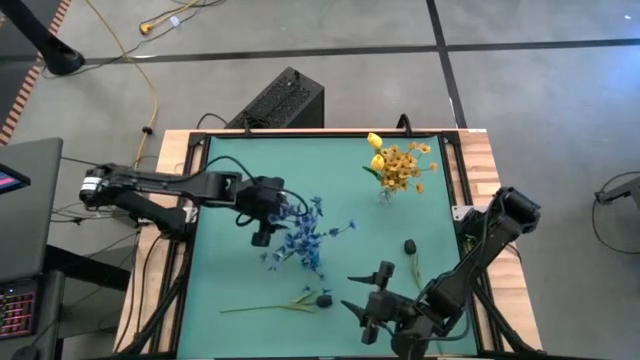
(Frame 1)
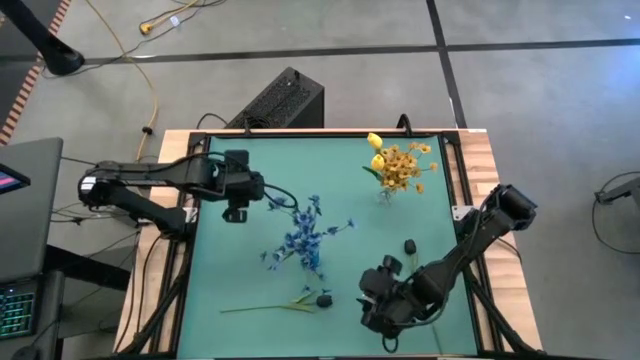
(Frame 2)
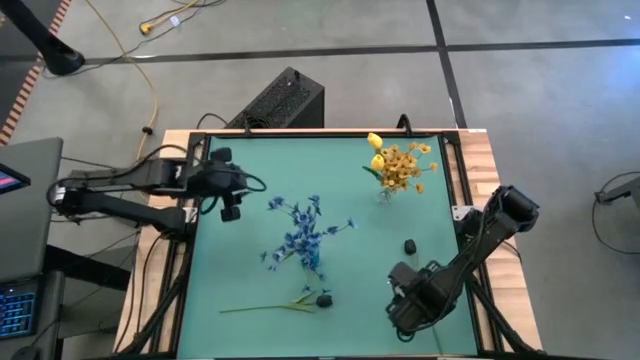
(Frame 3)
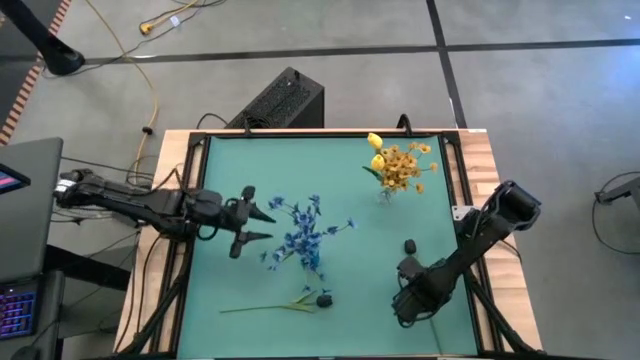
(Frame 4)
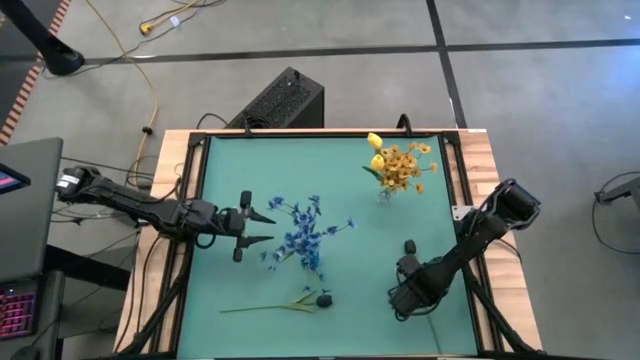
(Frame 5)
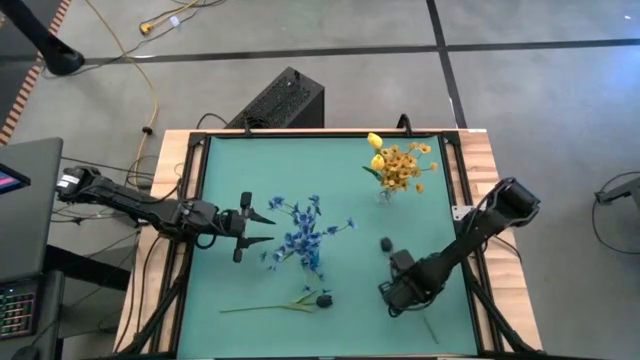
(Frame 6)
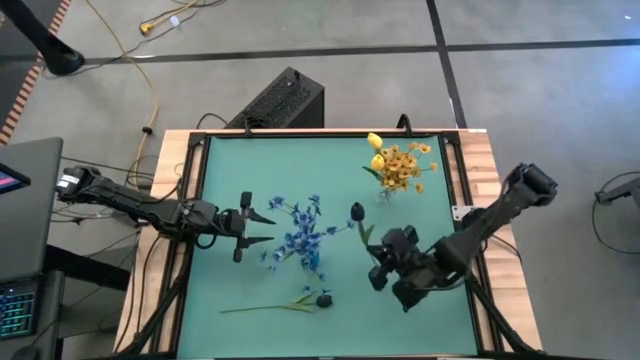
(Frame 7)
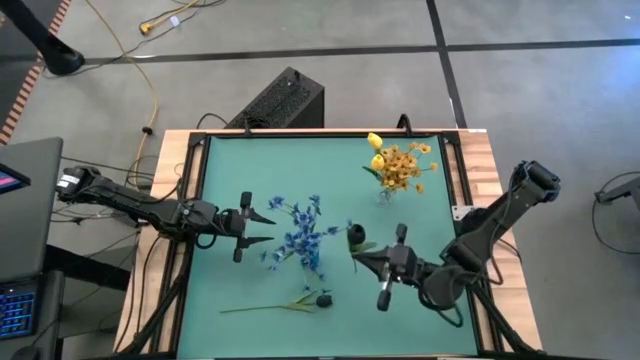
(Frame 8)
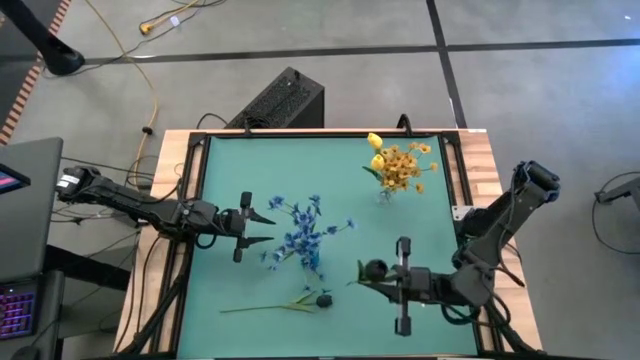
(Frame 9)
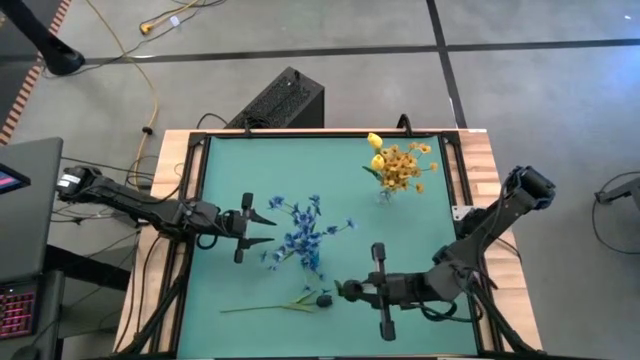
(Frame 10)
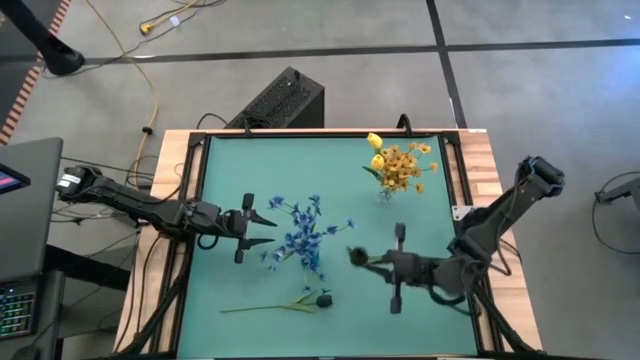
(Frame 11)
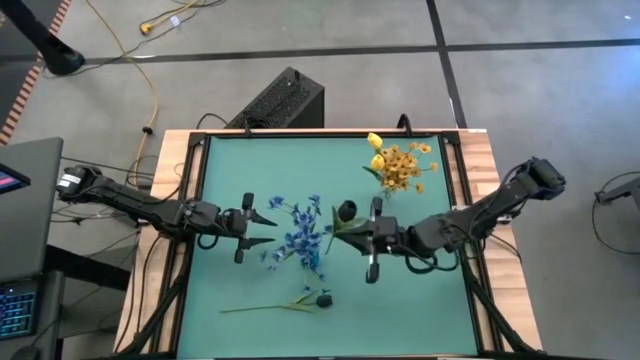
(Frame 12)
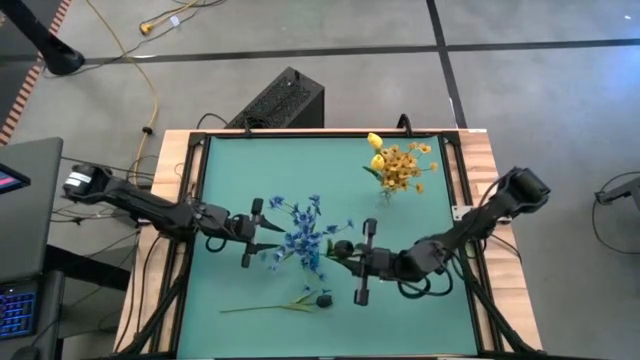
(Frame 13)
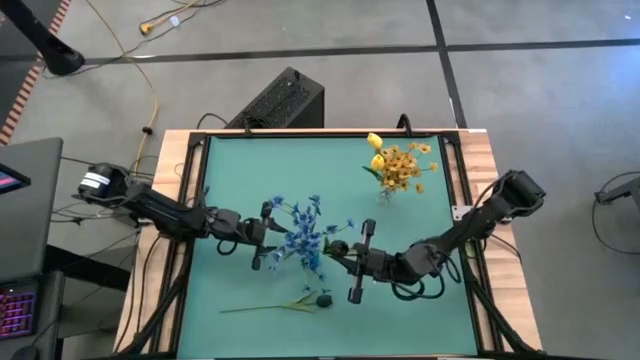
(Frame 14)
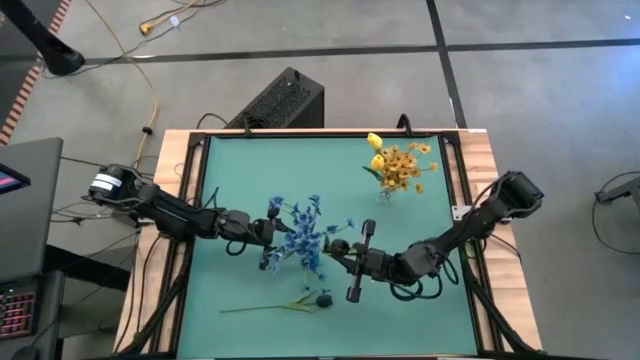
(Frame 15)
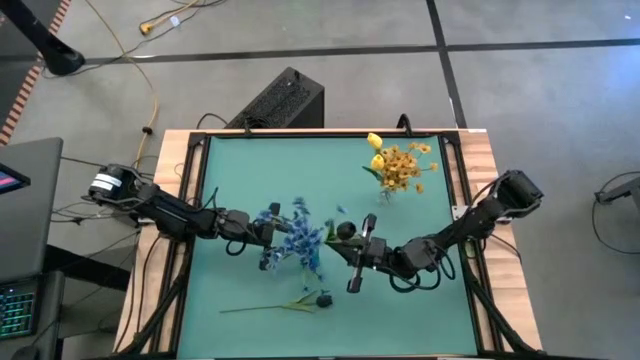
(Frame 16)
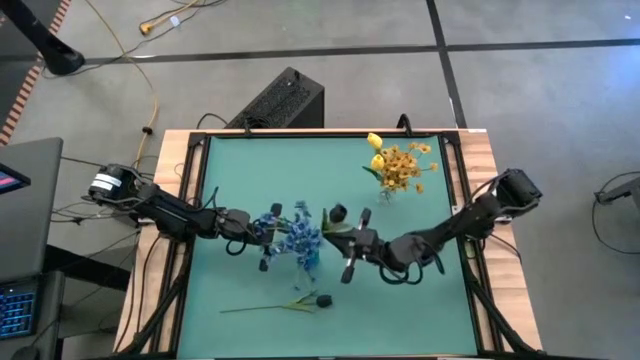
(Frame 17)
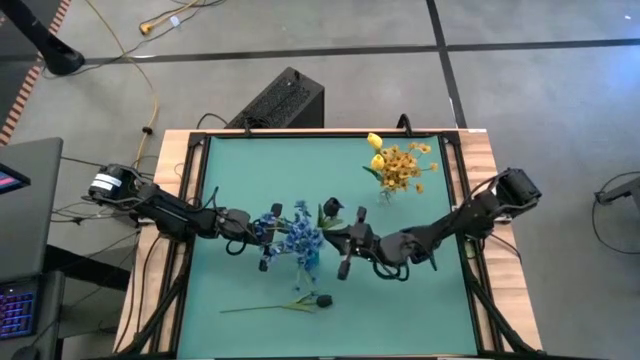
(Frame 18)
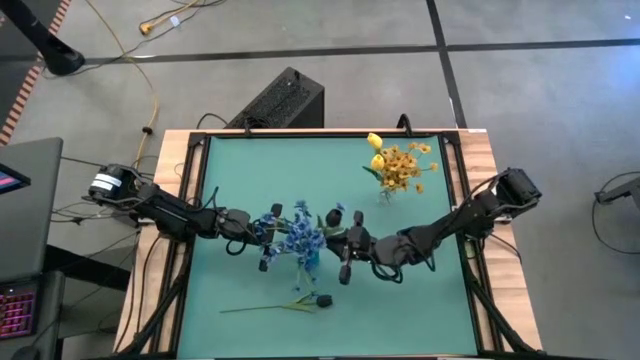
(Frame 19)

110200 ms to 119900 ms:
Task: Sort flowers into vase by color
Put the left black tulip into the blue transparent vase

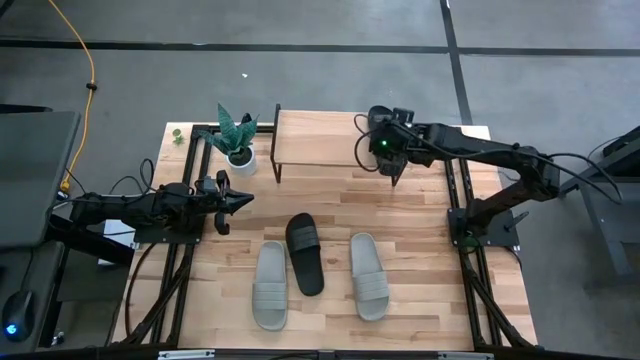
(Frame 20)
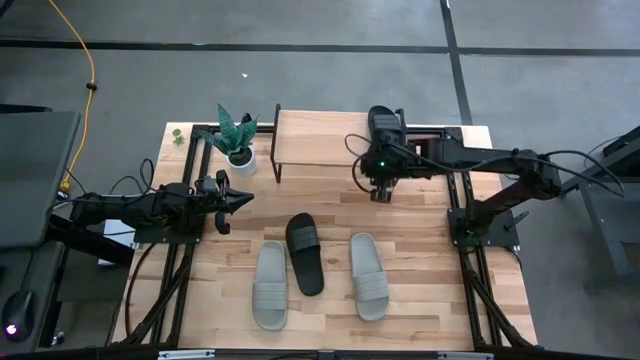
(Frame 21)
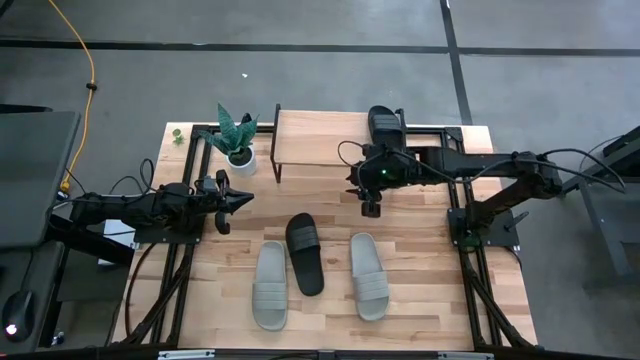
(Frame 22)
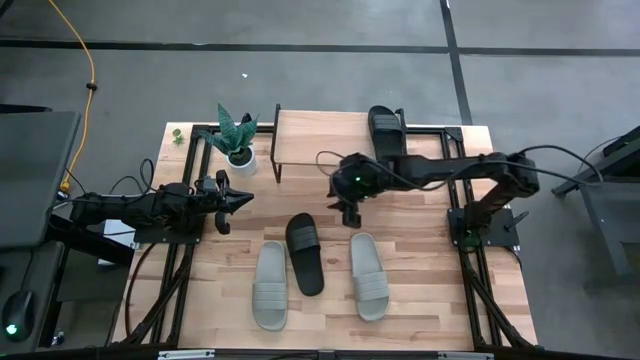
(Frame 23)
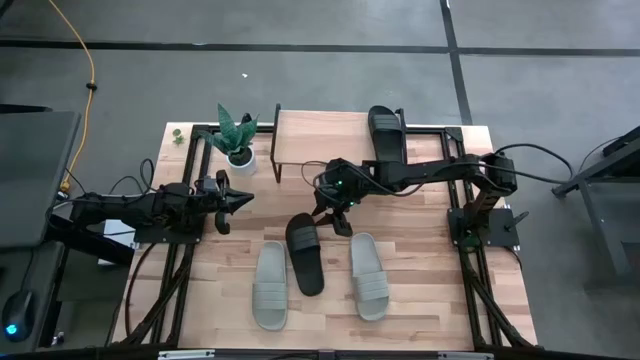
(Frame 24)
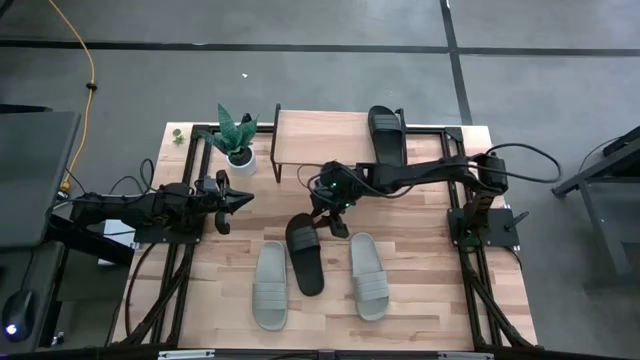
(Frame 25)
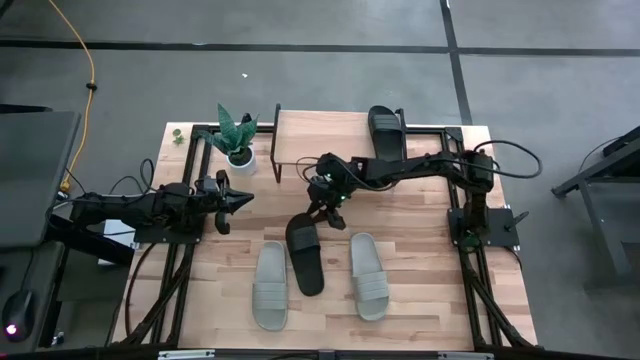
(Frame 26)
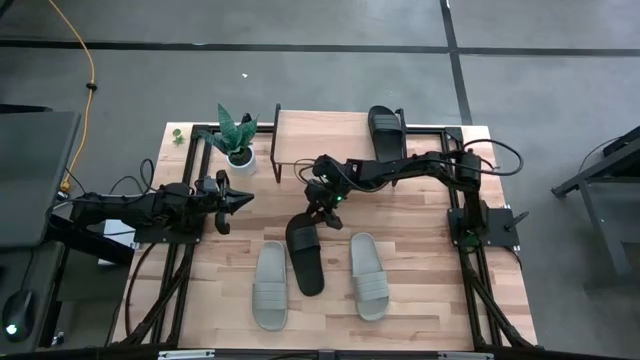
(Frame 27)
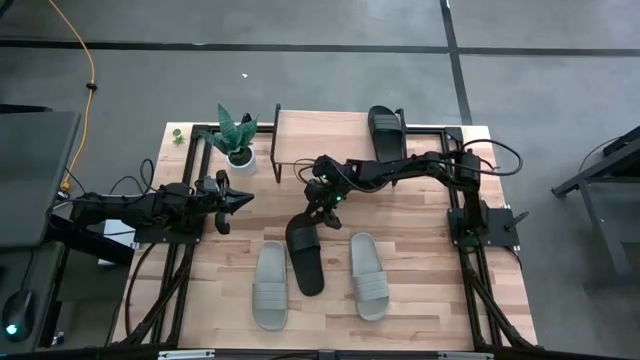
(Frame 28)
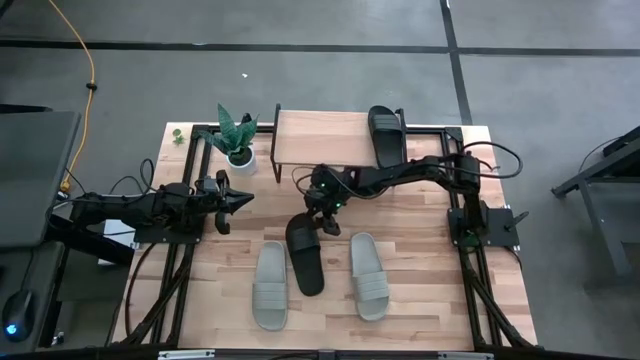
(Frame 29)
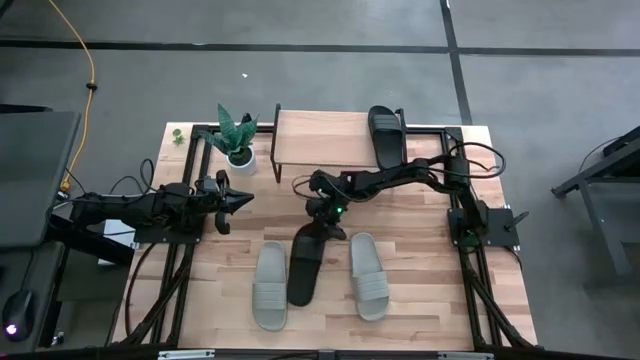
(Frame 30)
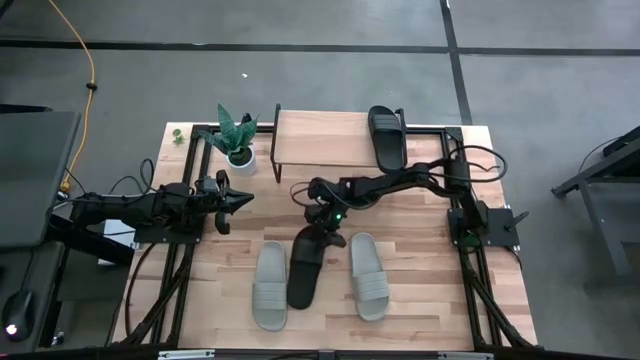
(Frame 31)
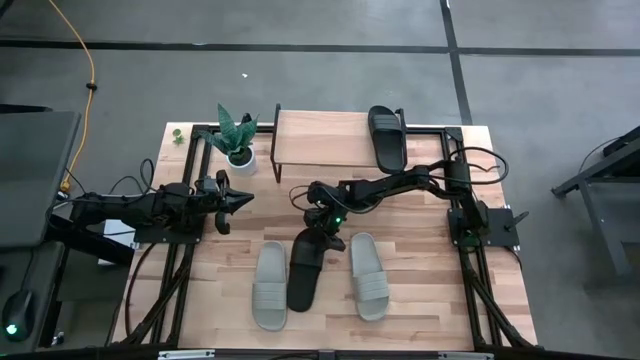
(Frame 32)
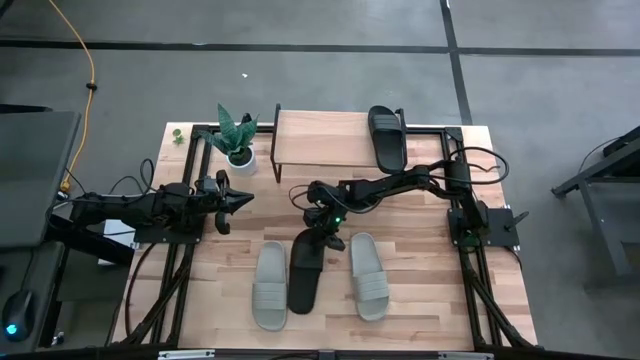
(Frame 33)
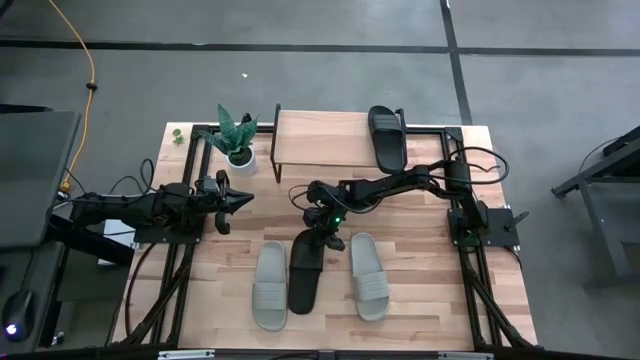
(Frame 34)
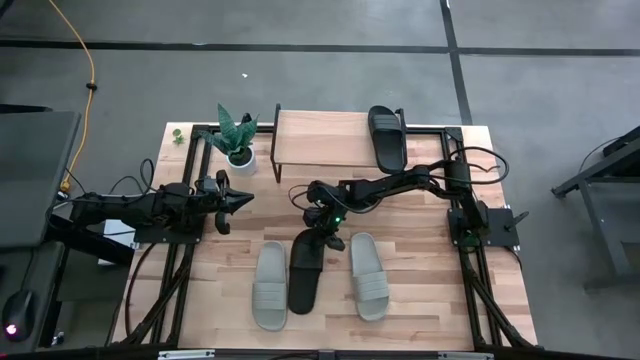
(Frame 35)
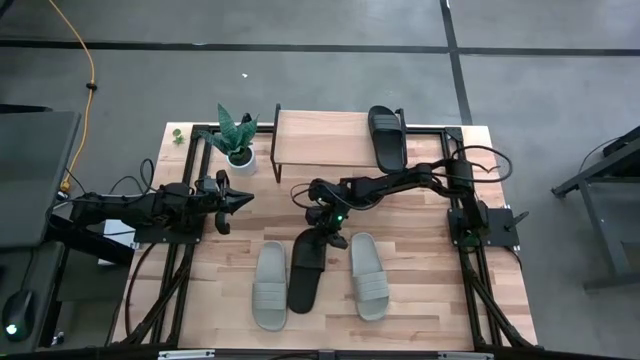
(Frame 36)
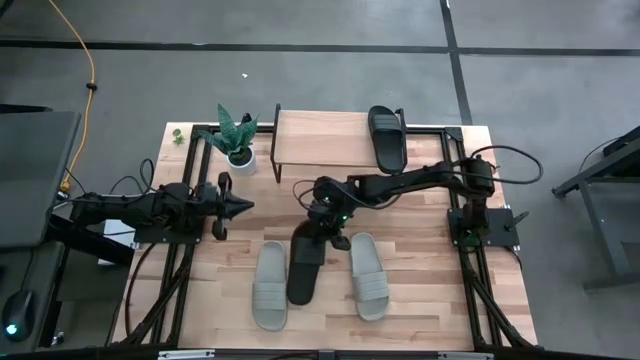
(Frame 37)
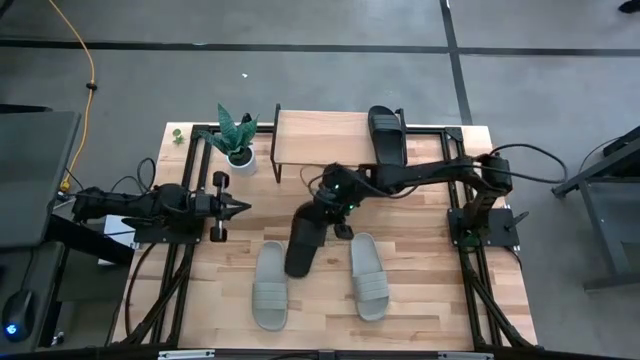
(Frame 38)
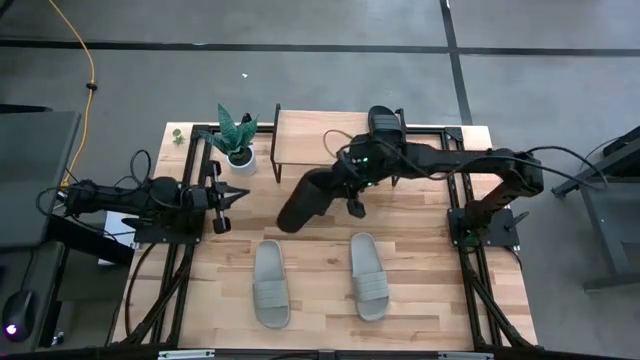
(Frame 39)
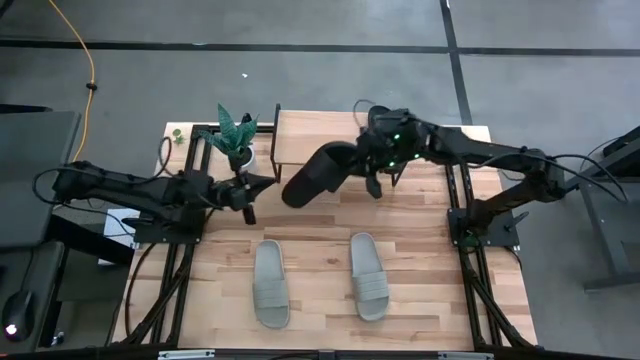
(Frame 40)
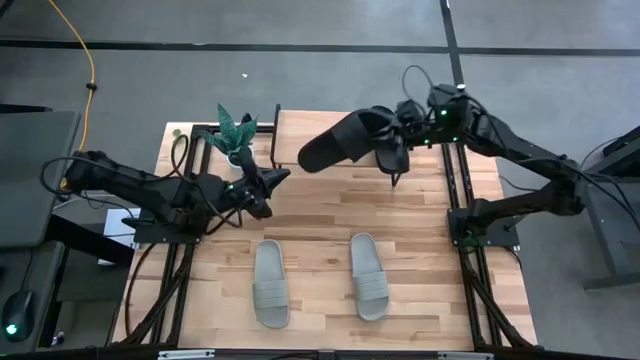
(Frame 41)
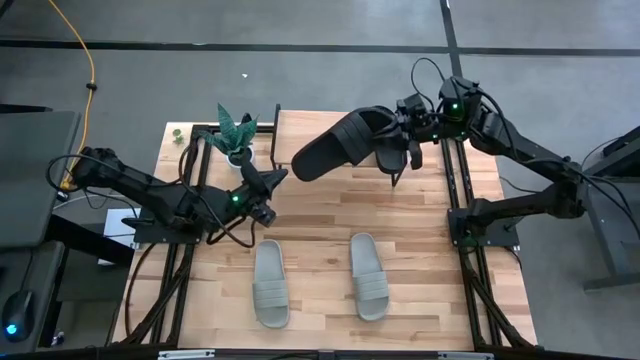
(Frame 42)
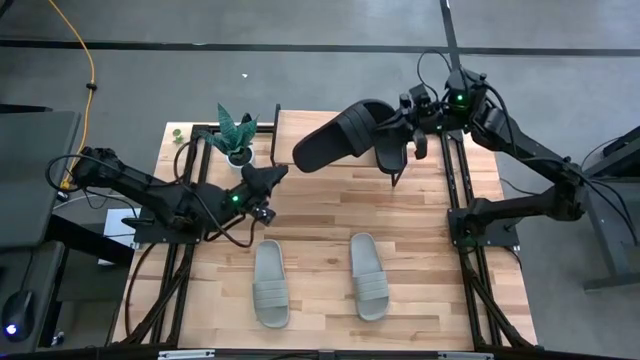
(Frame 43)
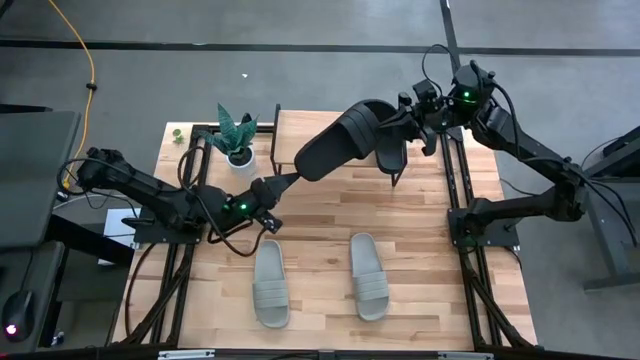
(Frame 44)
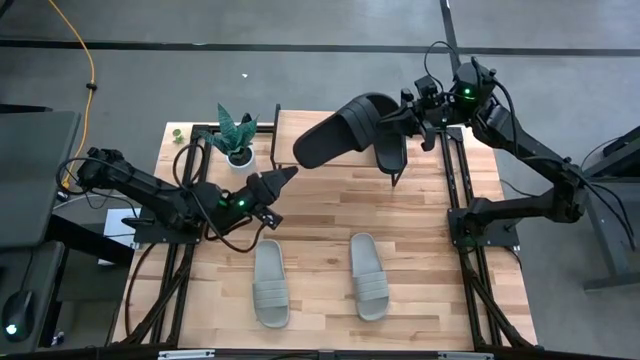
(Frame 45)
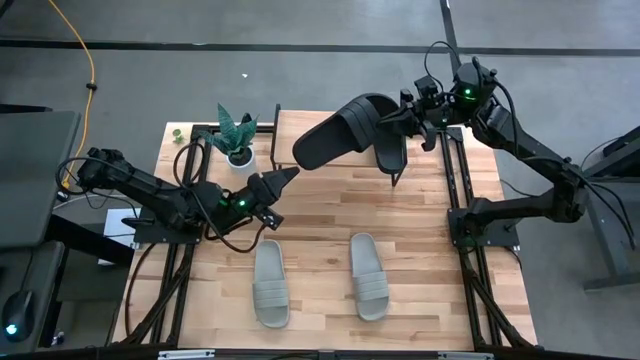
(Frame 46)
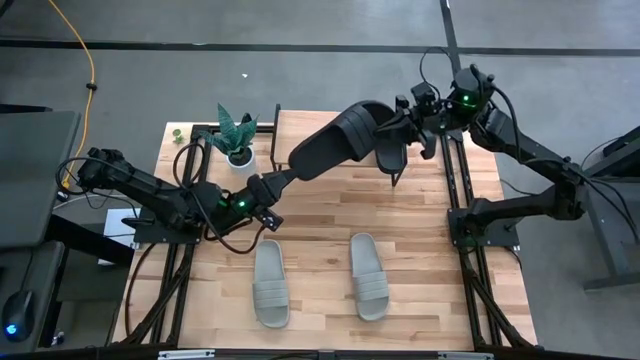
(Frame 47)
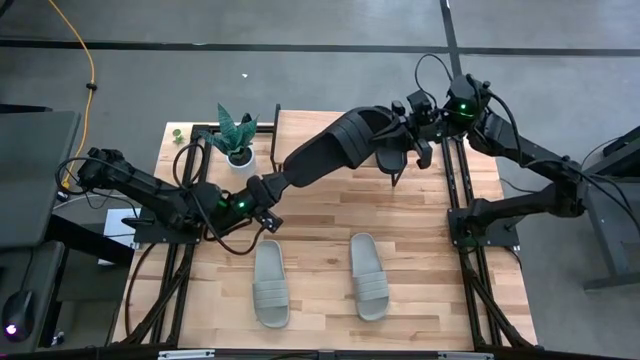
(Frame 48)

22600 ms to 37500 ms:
Task: Pick and place slides into the shelf
Put the black slide on the shelf
